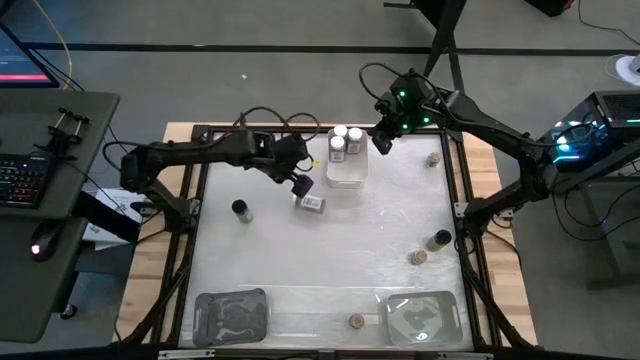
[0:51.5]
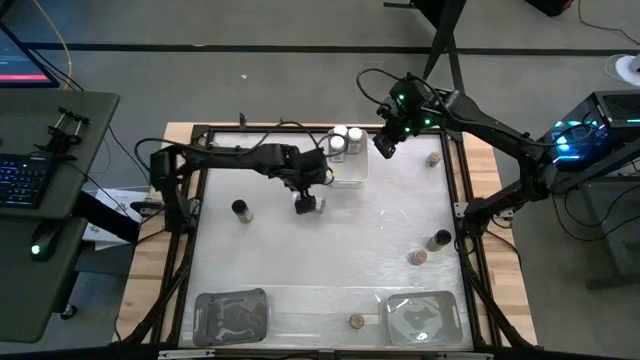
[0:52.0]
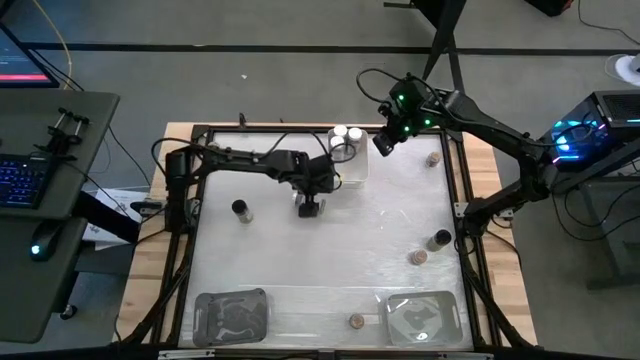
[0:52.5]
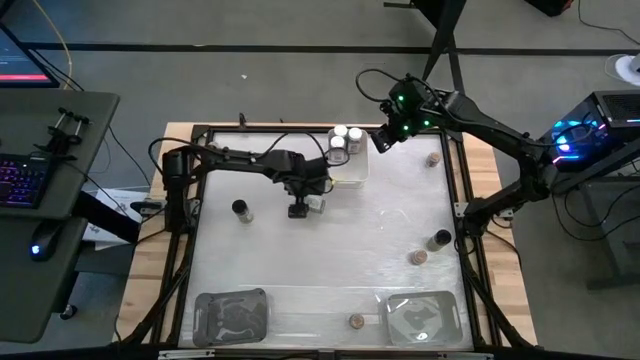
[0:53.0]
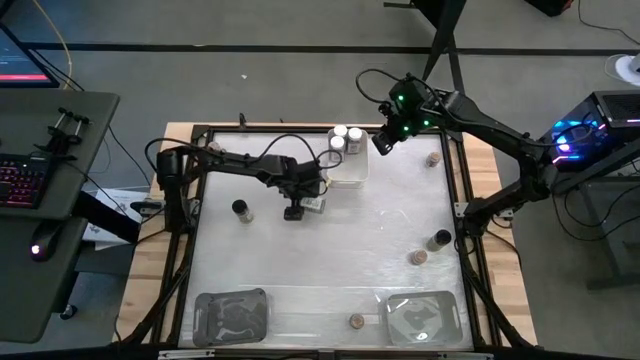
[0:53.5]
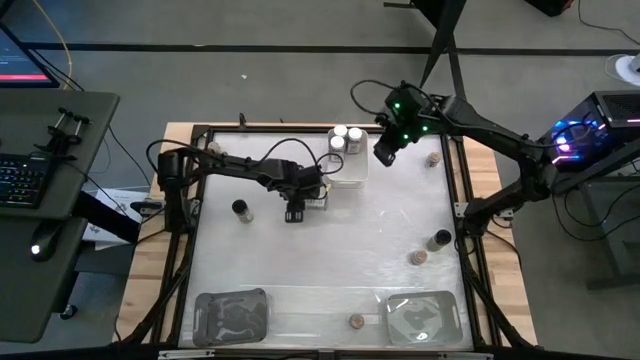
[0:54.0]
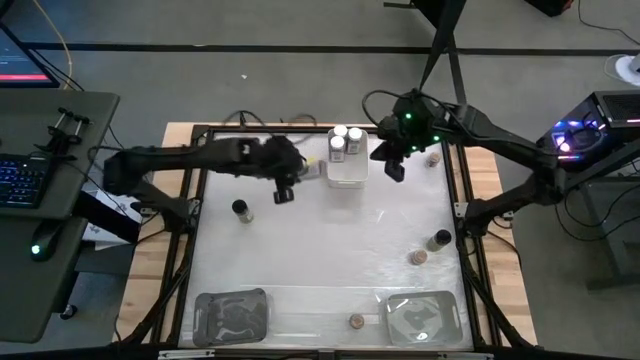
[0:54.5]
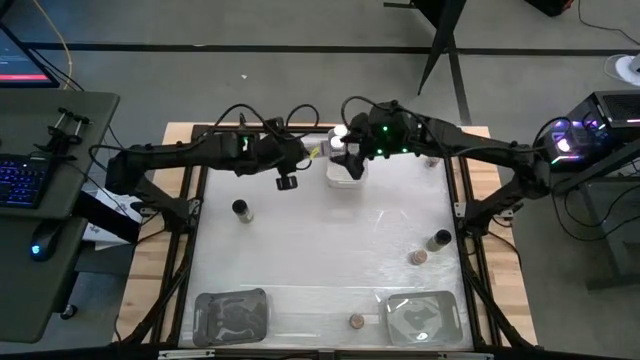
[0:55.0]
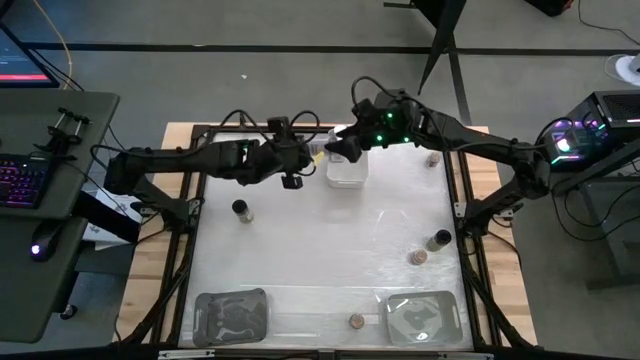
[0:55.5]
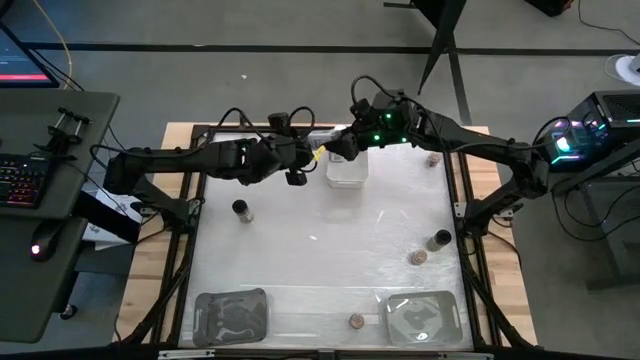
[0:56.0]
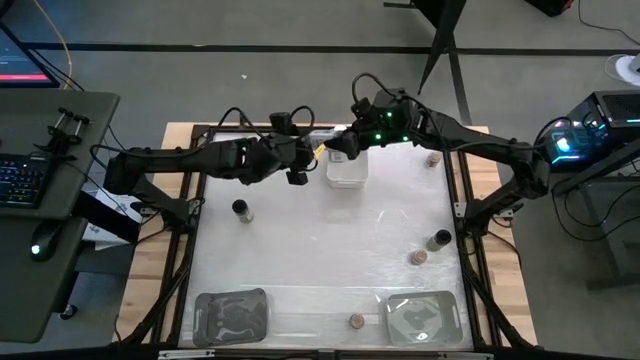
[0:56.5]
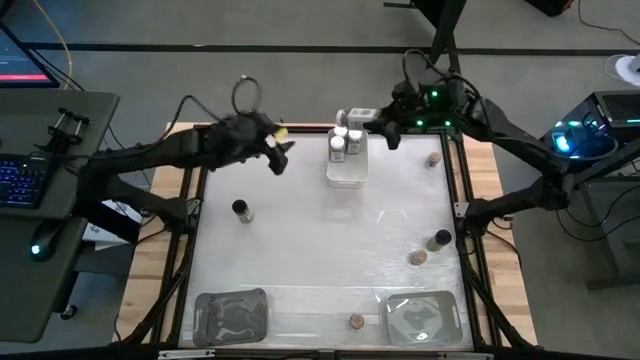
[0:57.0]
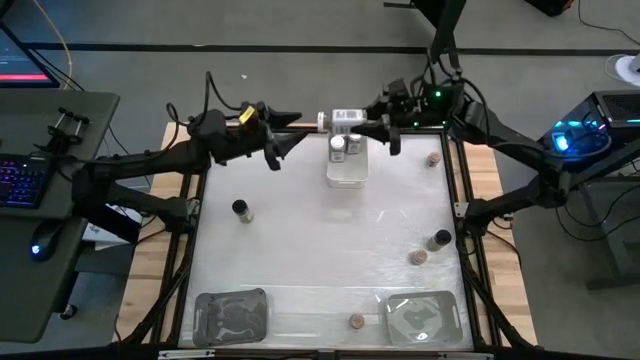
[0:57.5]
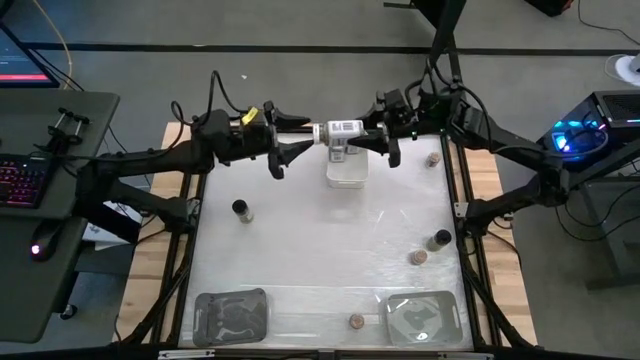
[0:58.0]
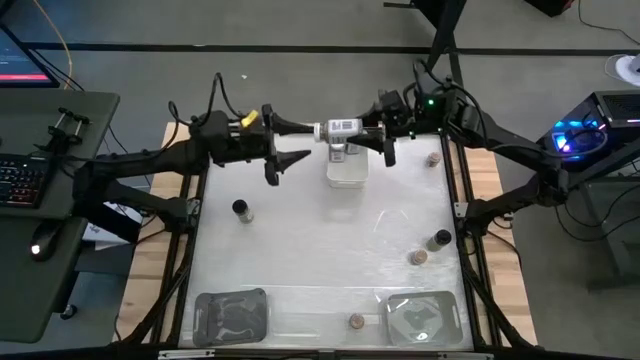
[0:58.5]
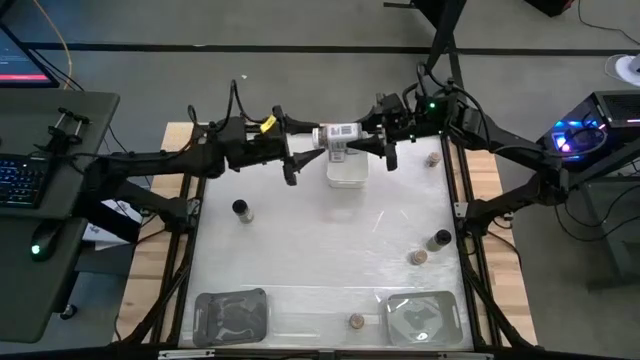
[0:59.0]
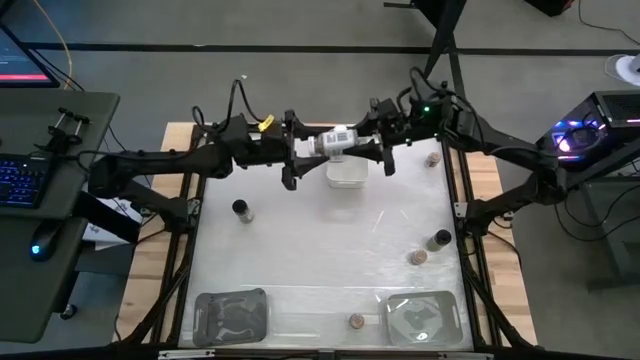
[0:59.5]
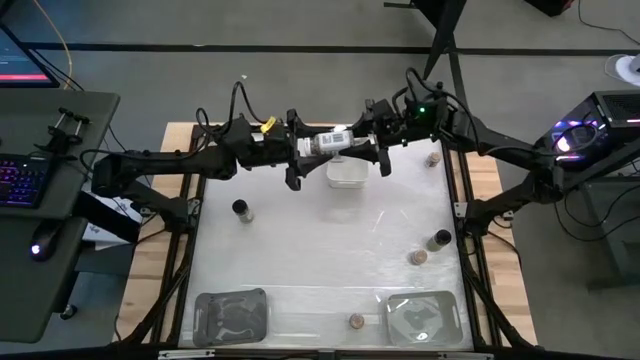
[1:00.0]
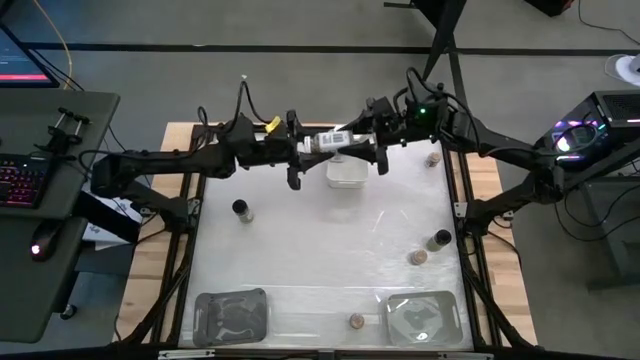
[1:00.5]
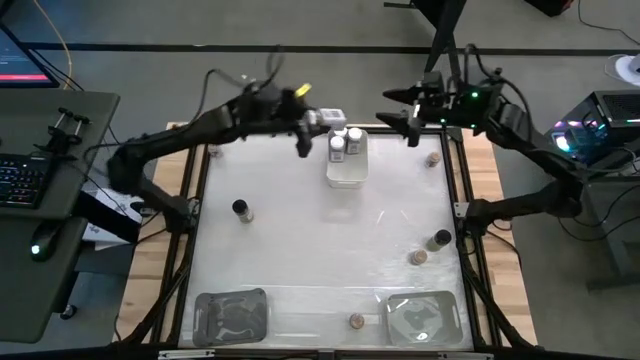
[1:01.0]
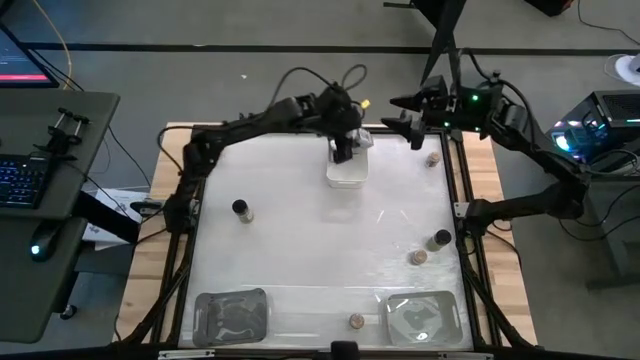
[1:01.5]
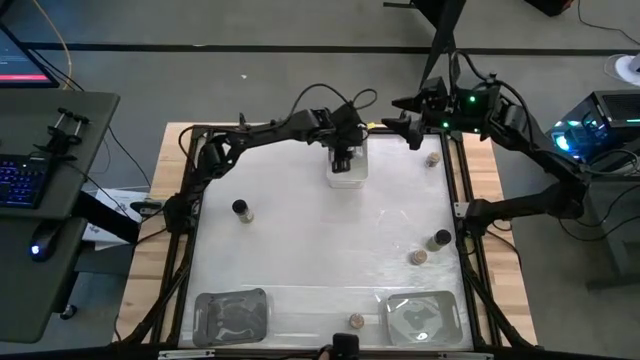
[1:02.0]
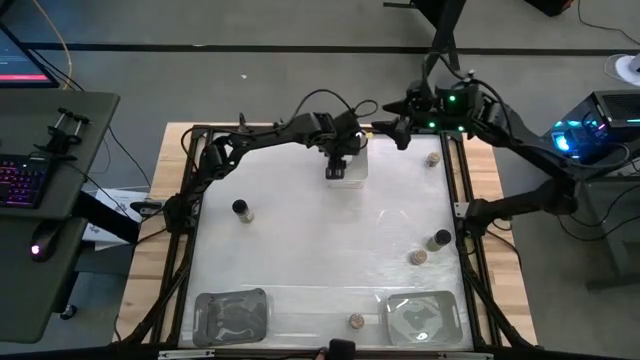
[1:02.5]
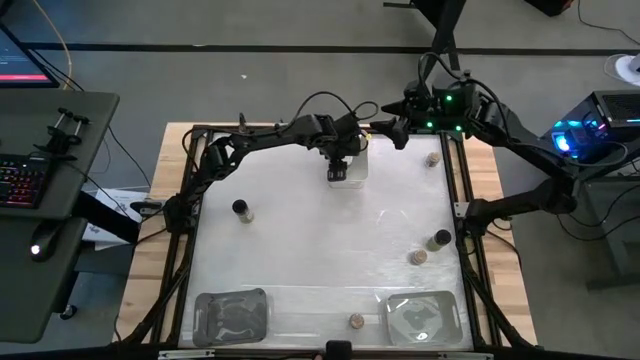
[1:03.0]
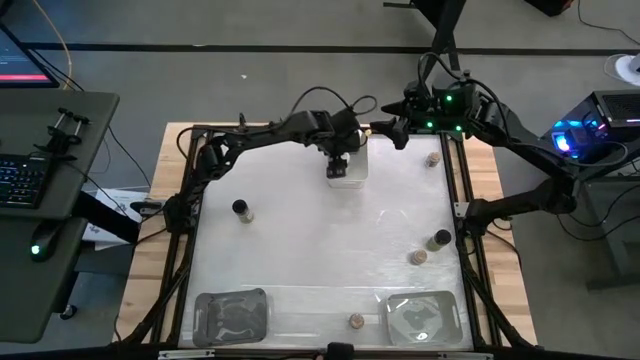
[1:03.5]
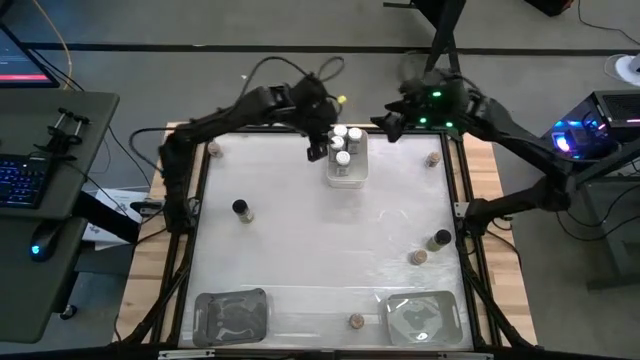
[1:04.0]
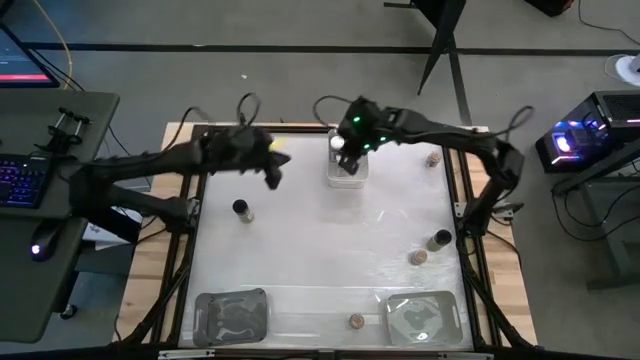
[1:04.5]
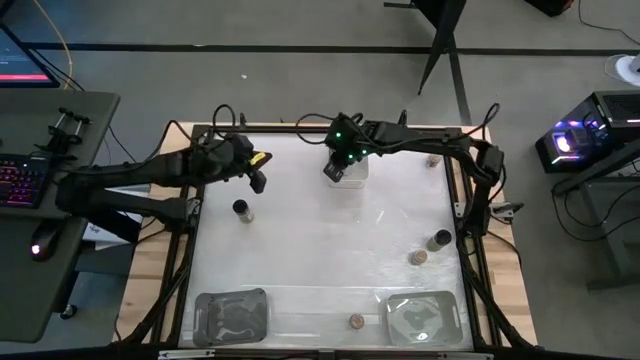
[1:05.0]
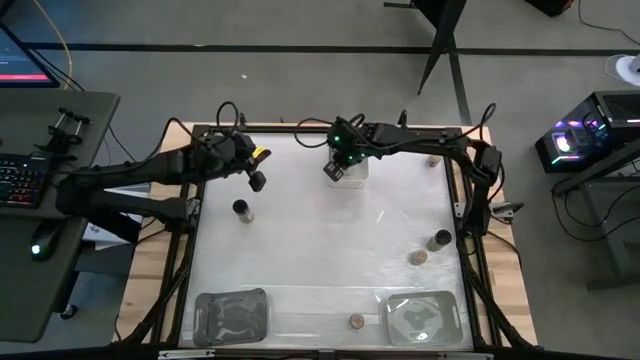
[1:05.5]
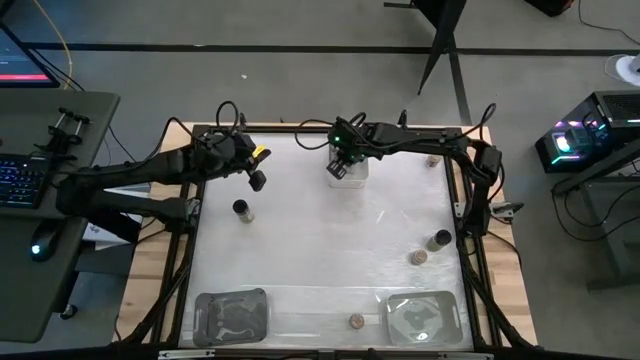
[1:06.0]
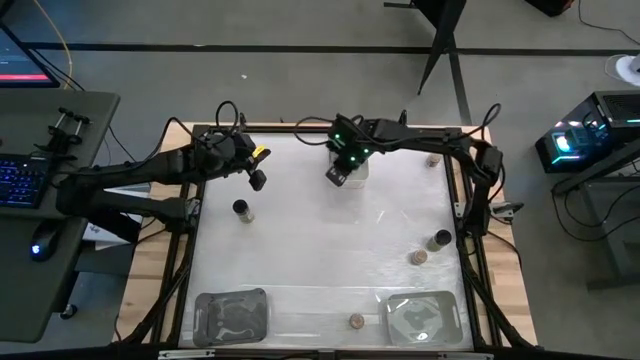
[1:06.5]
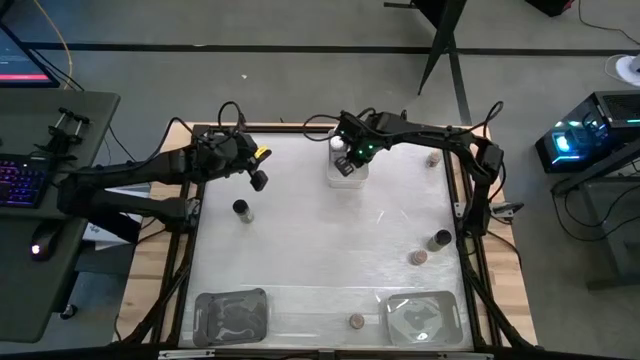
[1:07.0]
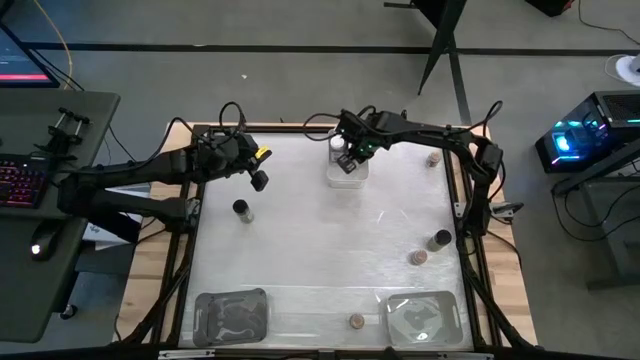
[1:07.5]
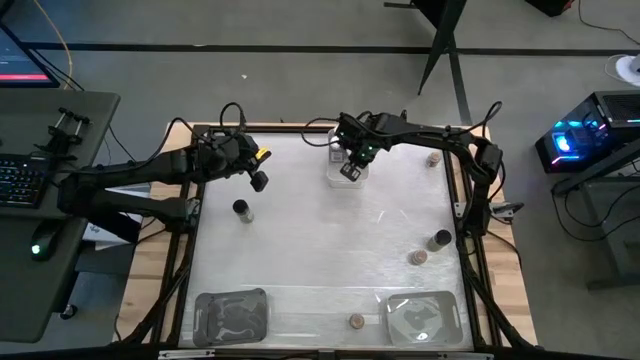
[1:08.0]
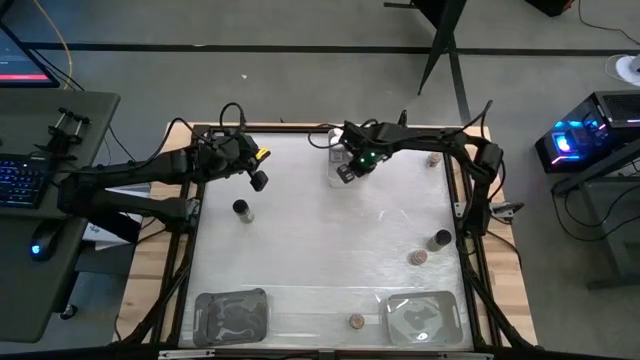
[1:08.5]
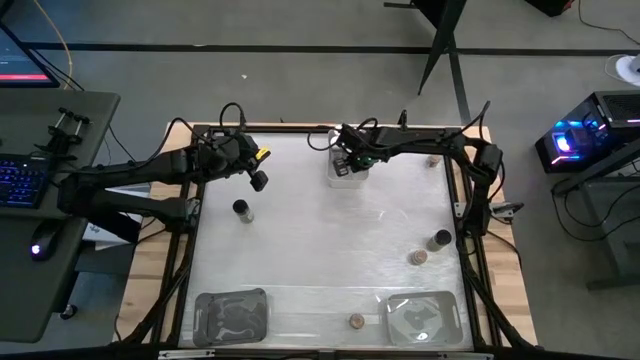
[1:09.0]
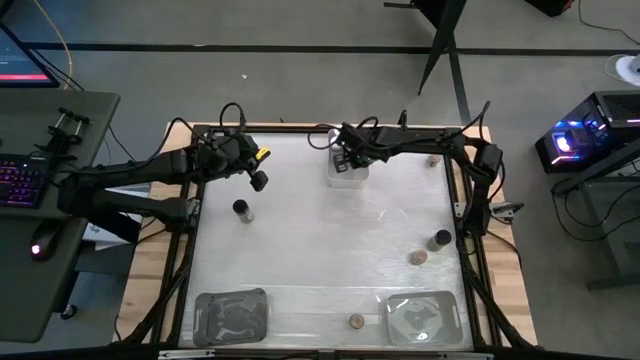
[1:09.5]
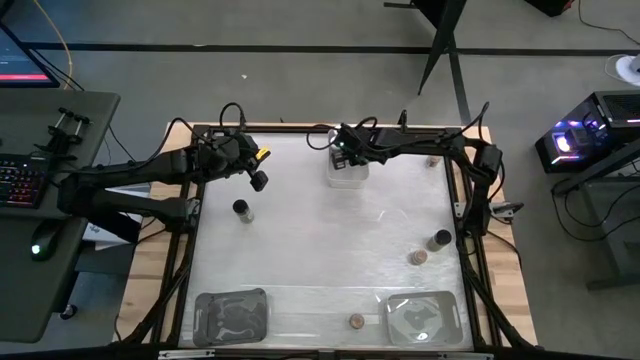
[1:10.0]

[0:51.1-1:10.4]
Task: Sort spices by type
Put the white seasoning bottle into the white bin

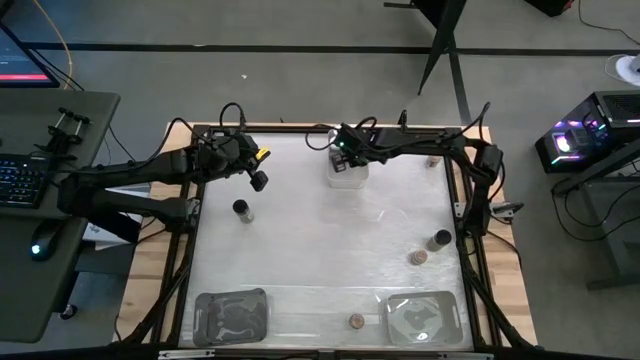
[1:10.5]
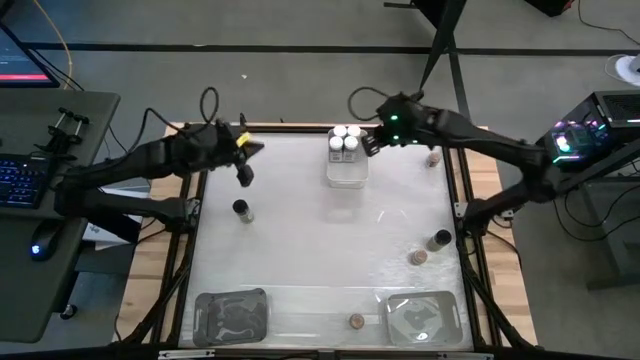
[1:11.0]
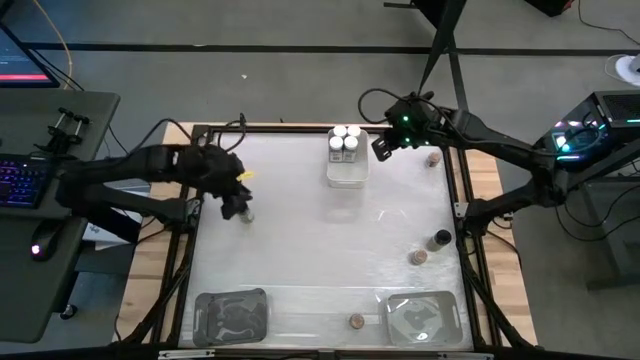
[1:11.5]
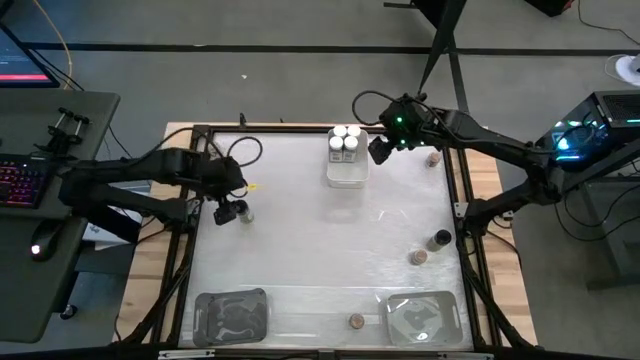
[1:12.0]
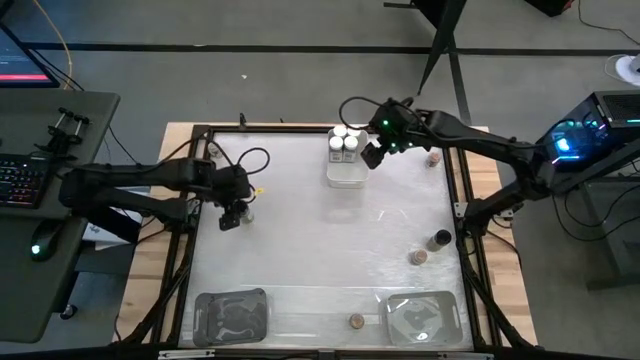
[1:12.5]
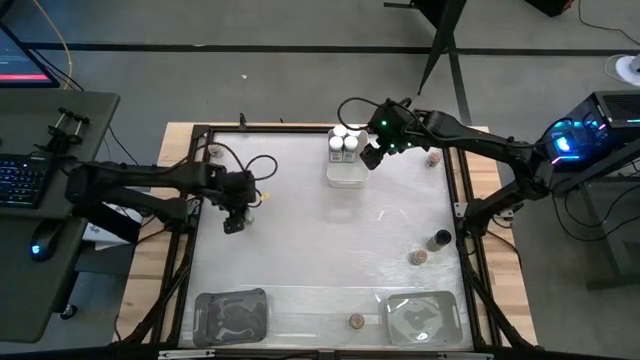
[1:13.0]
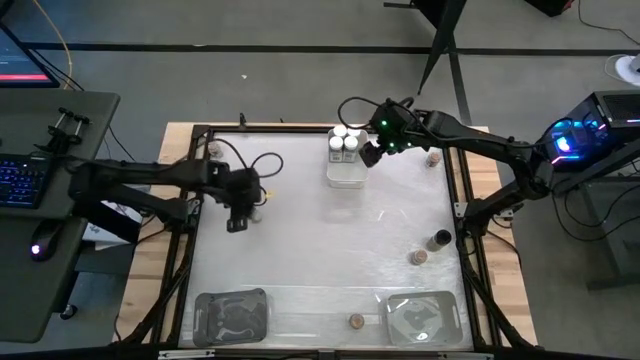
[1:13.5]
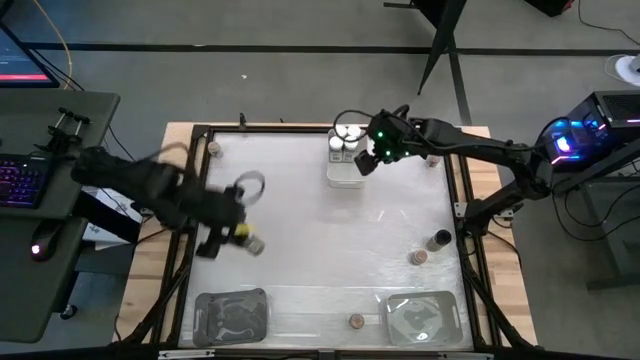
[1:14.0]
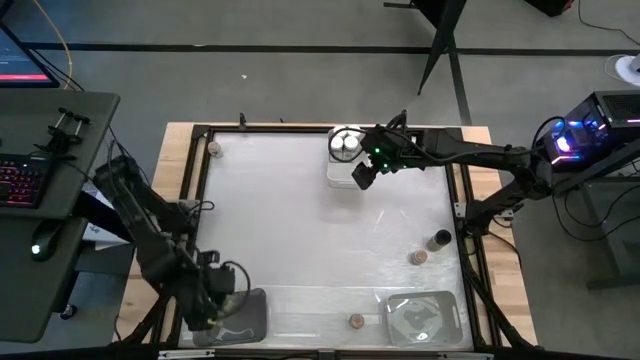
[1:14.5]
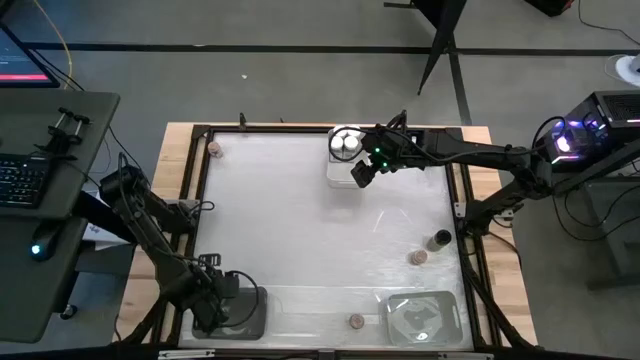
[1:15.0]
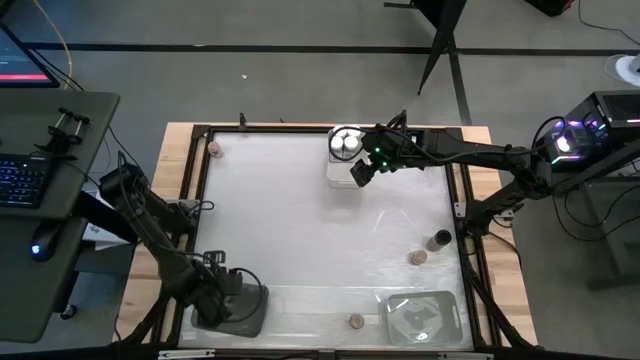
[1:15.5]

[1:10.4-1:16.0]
Put the left black seasoning bottle into the black bin
